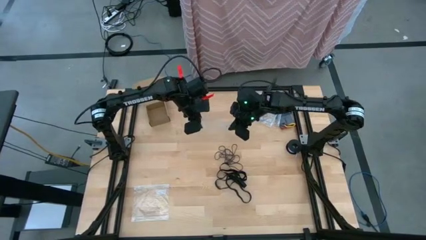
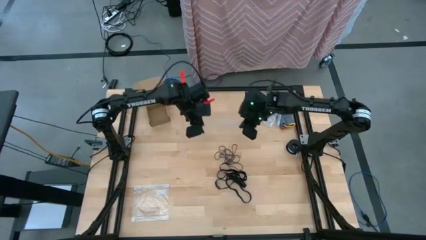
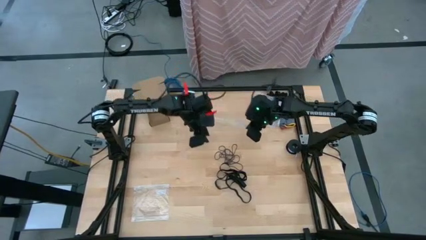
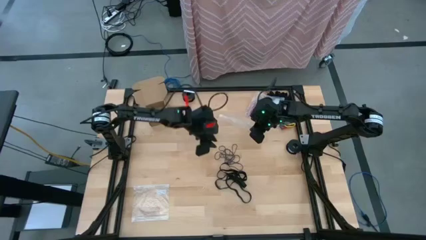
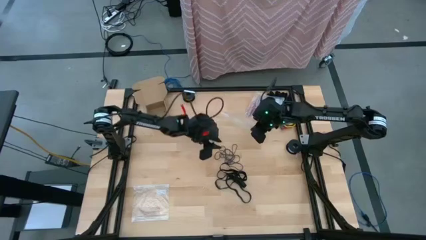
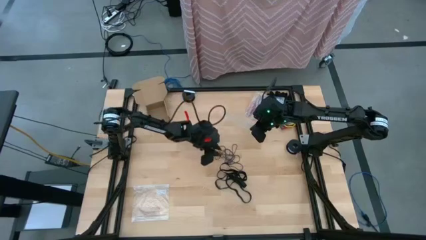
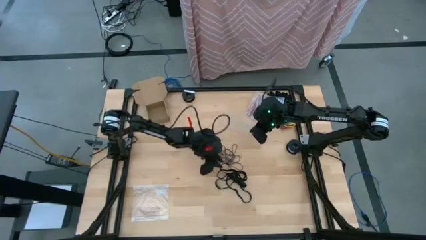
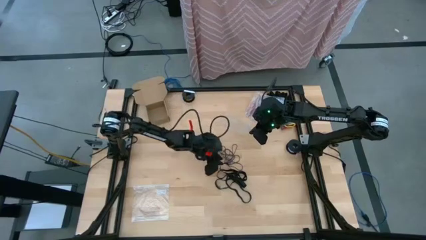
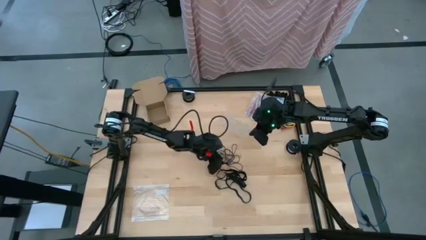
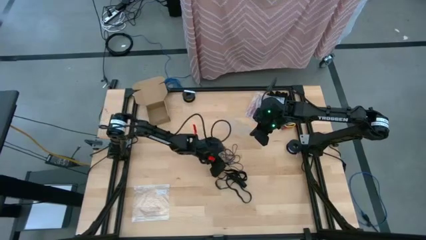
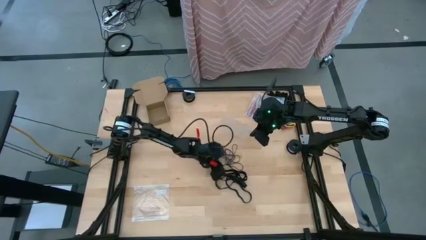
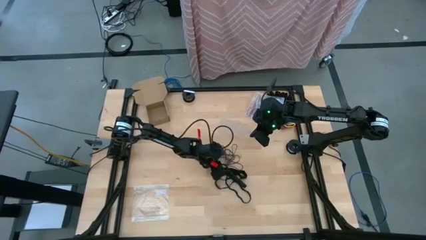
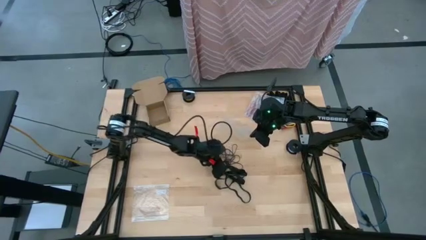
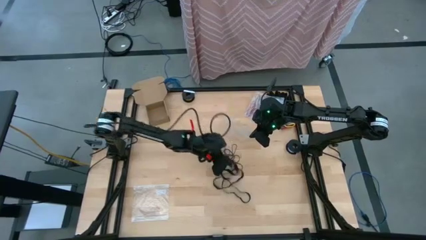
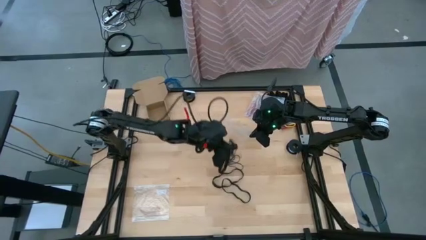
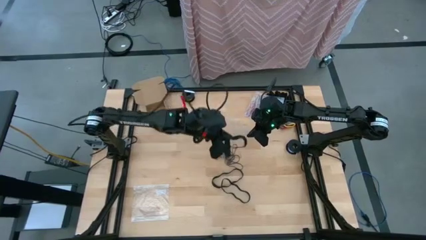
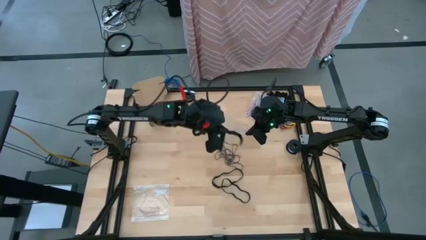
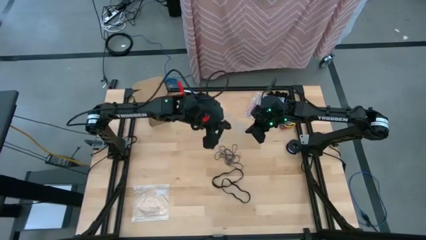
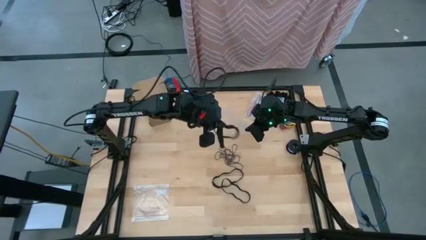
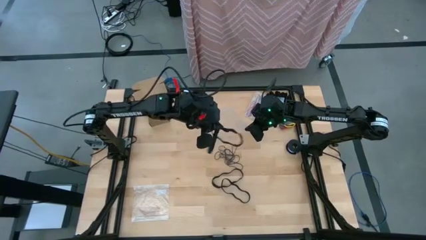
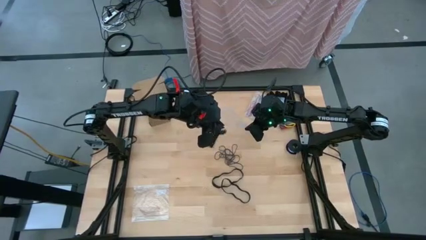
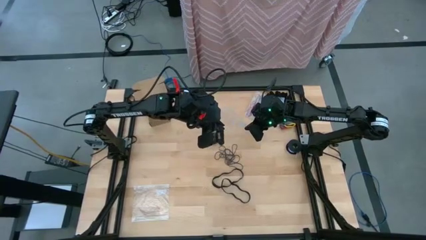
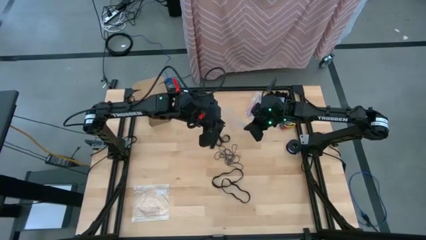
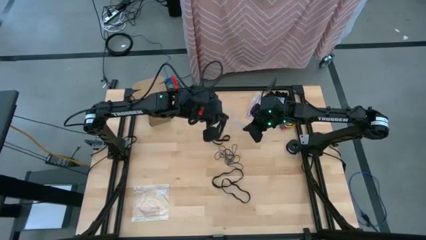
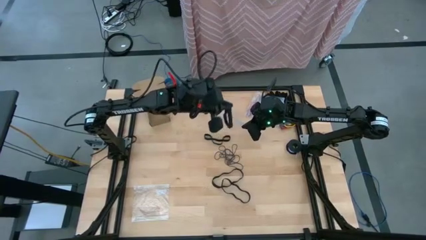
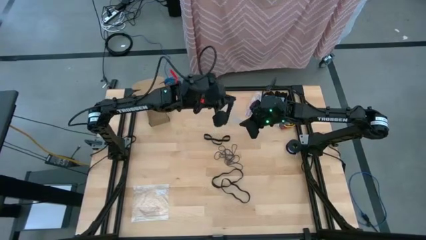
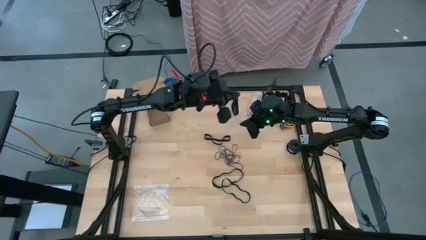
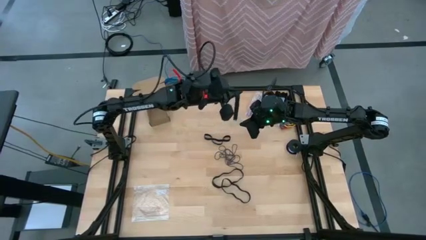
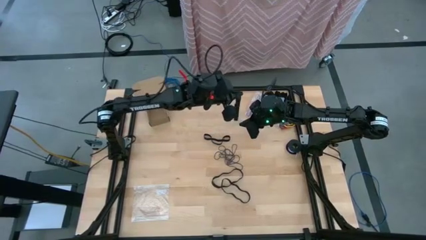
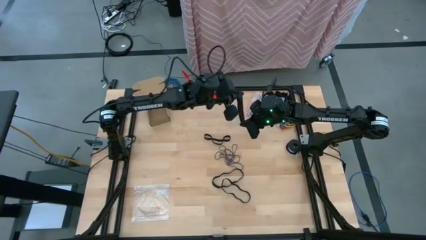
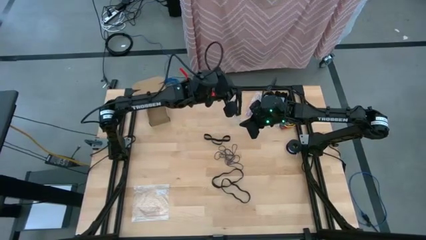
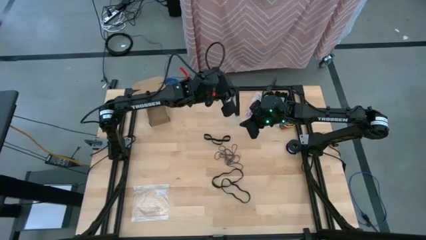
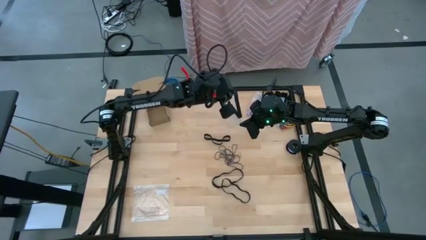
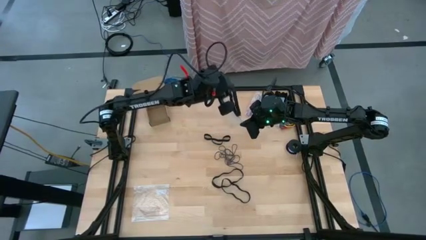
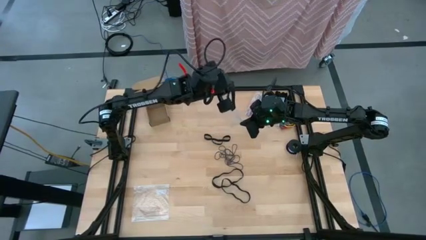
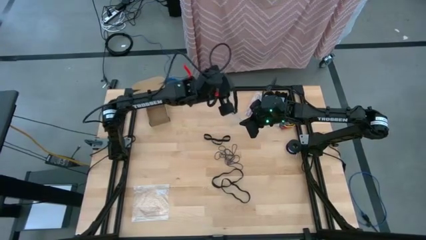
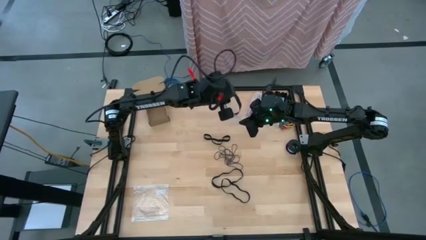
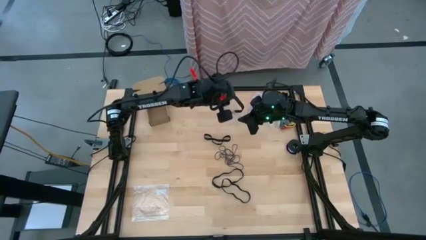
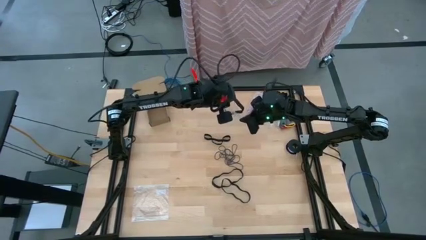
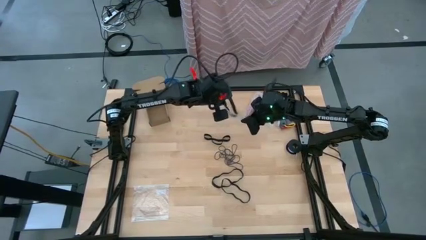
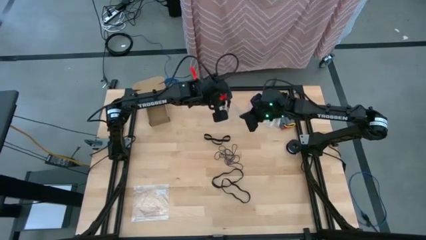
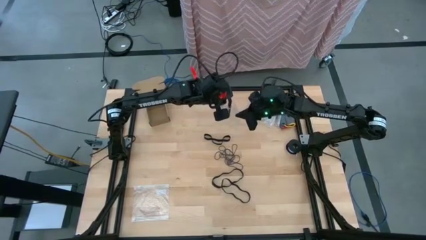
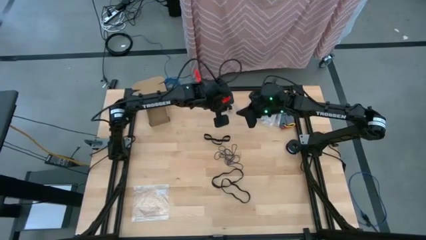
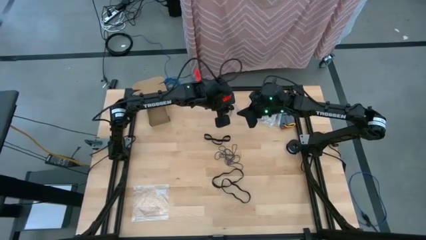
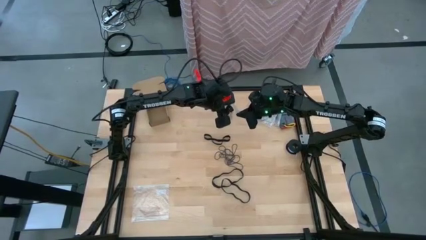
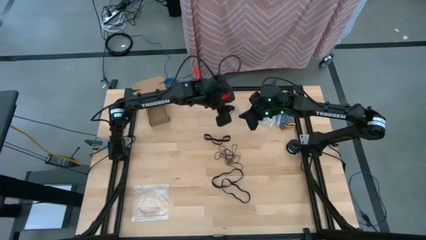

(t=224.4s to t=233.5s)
Task: Sort rubber bands
Put the black rubber band into the transparent zip bag

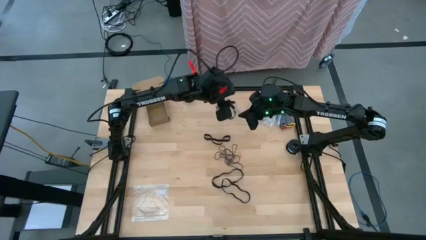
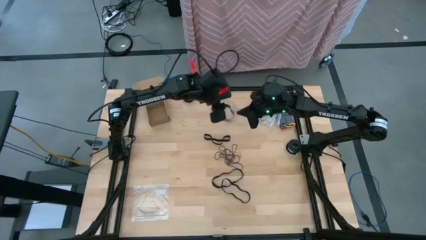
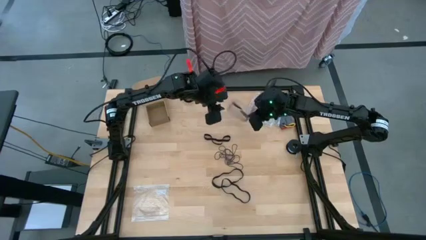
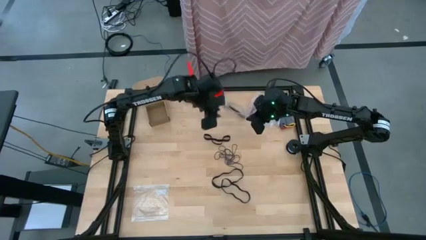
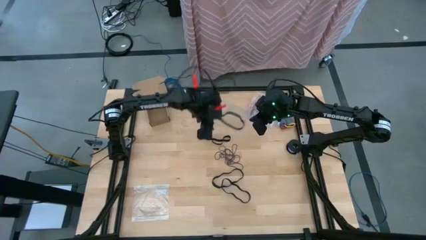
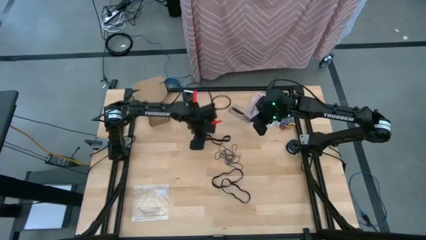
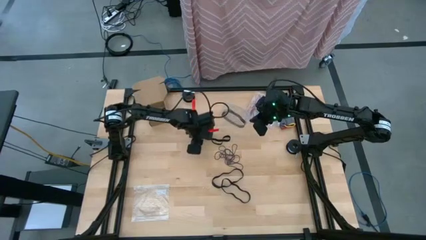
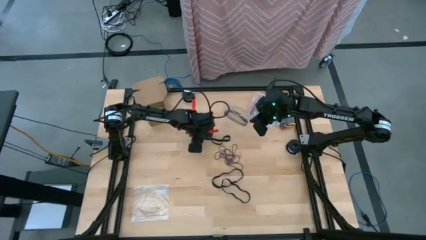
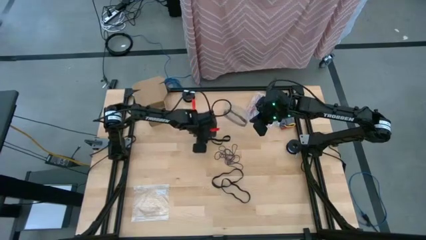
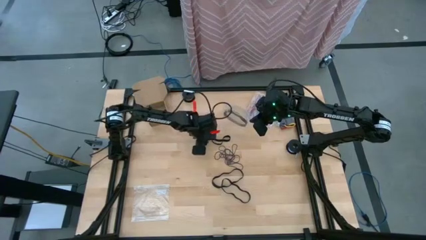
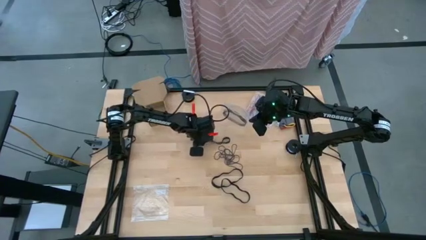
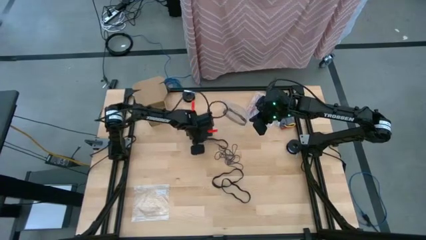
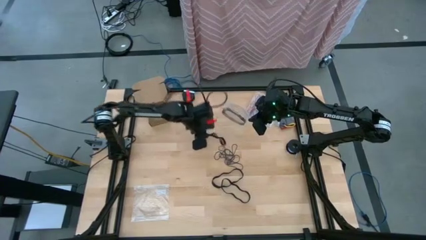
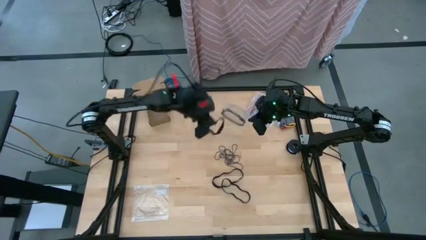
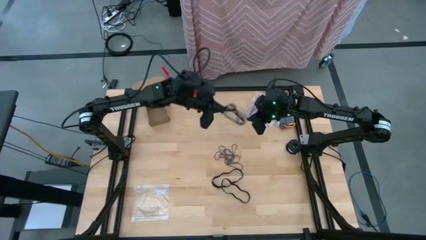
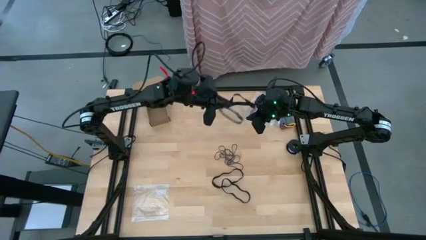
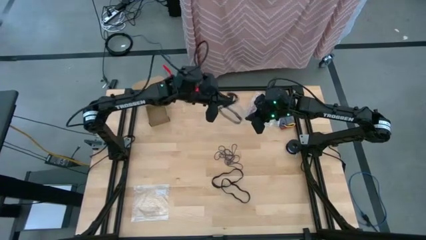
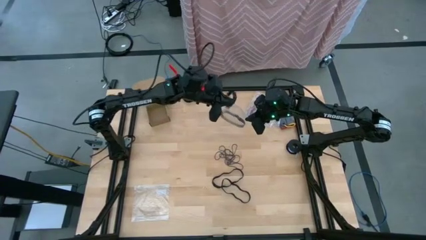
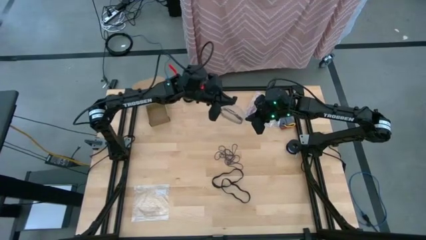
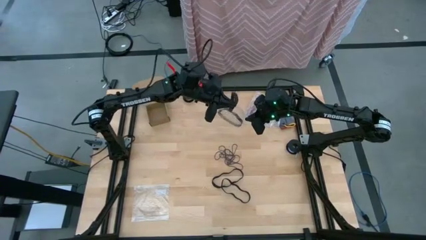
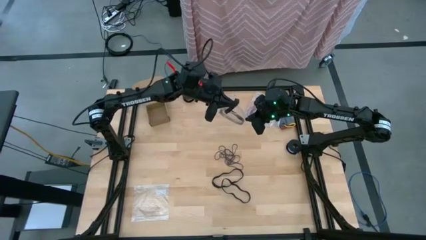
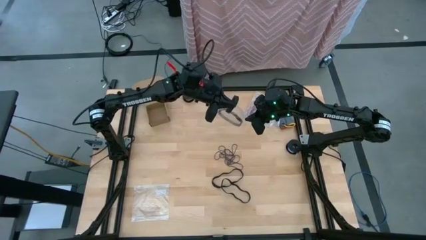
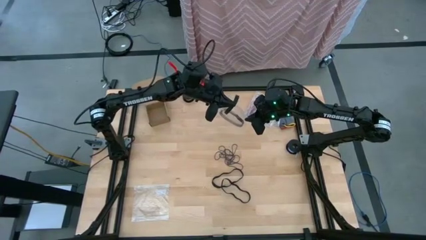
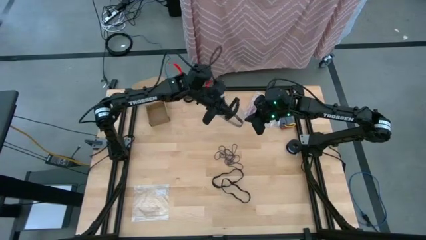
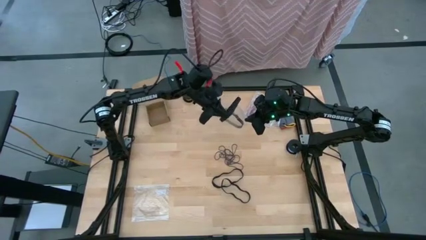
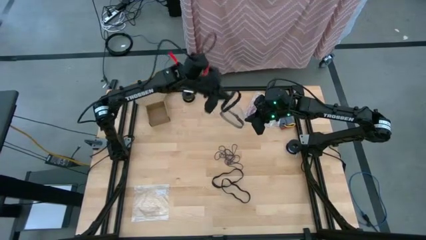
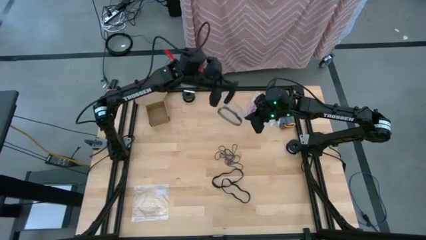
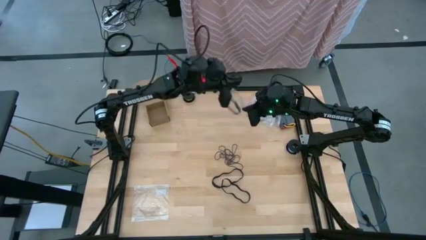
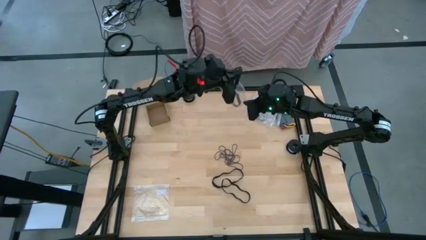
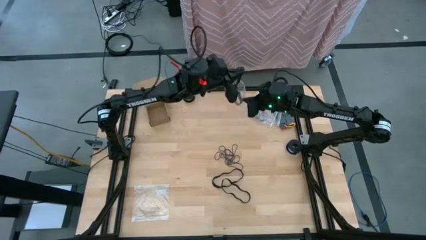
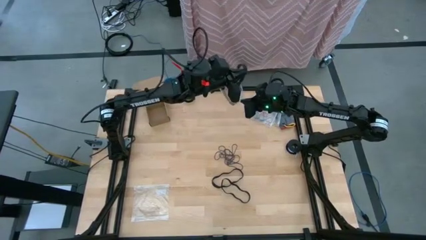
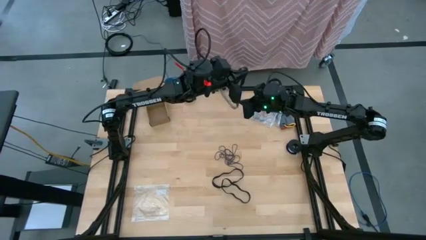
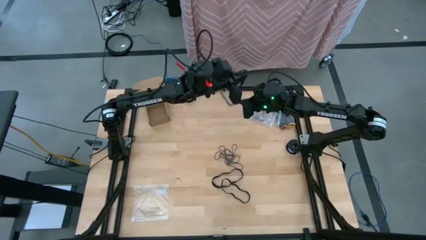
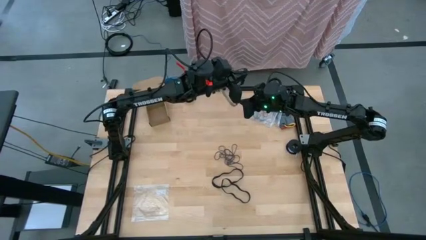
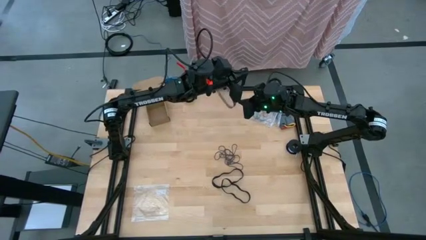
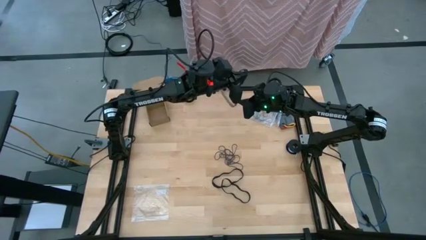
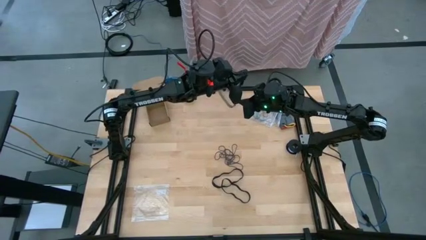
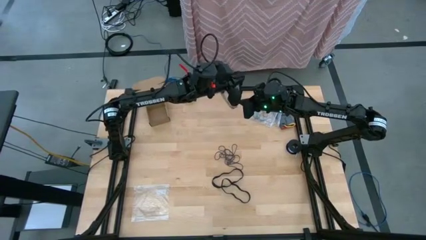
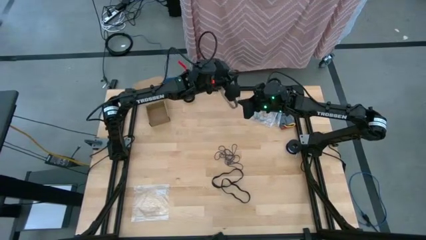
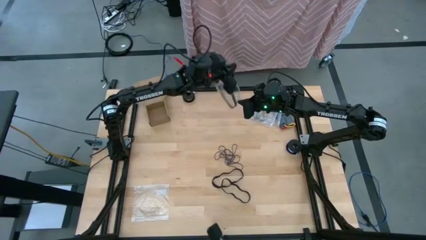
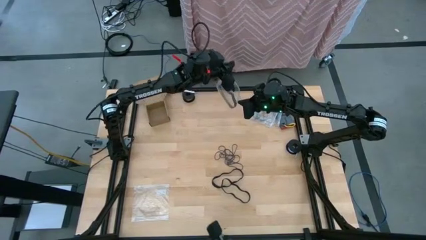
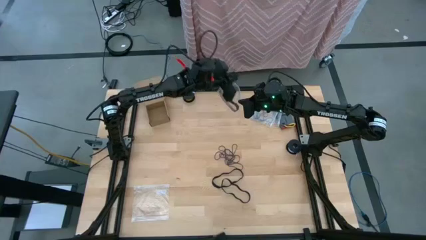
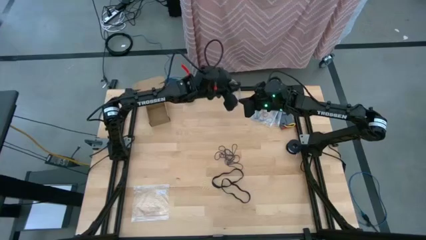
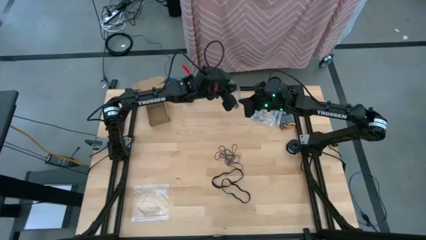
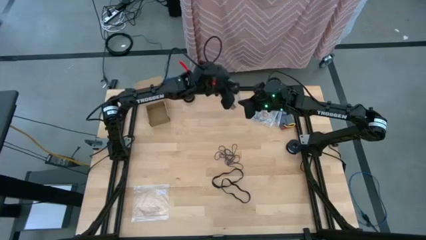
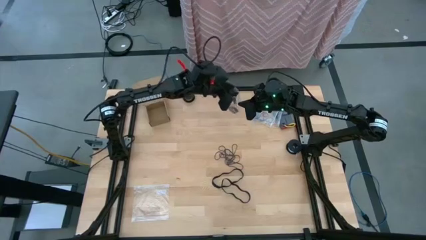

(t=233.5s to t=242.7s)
Put the black rubber band into the transparent zip bag
